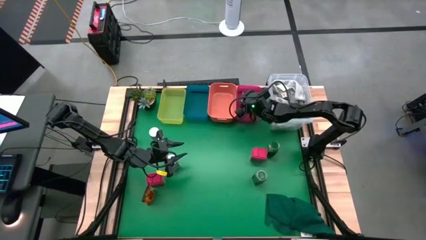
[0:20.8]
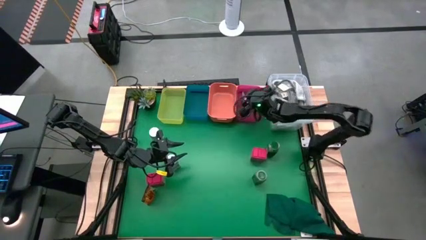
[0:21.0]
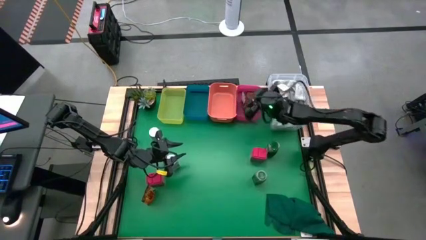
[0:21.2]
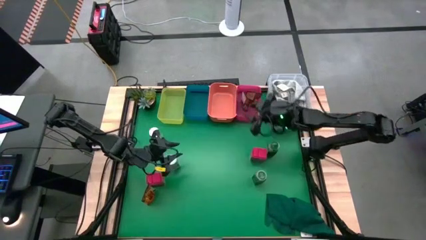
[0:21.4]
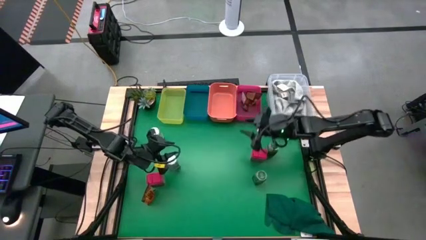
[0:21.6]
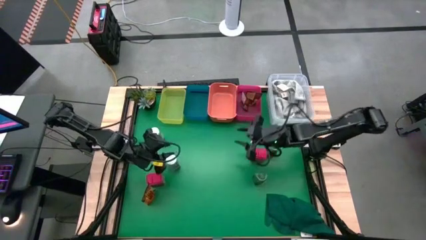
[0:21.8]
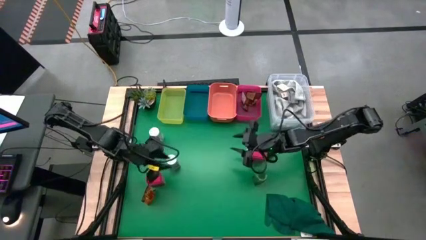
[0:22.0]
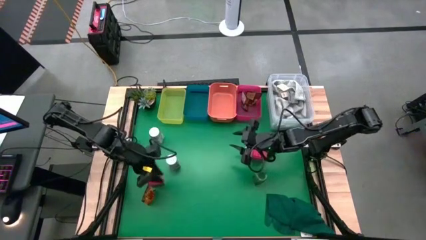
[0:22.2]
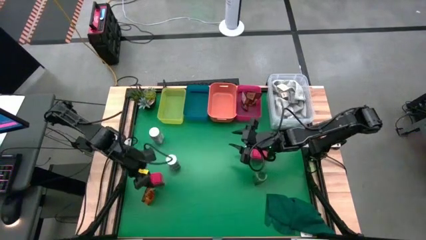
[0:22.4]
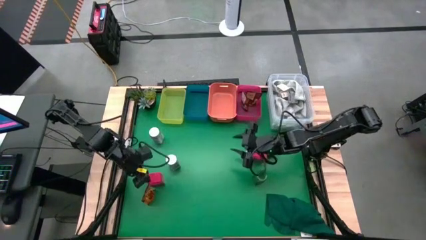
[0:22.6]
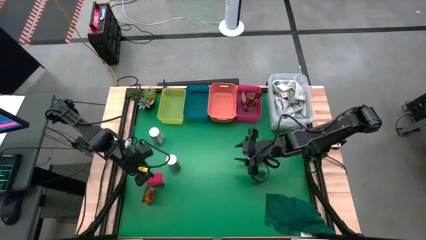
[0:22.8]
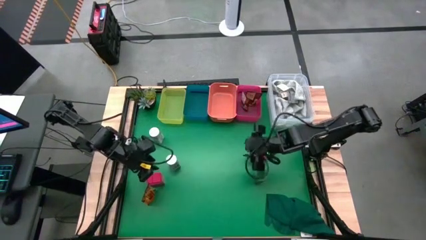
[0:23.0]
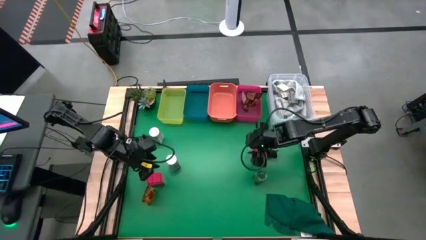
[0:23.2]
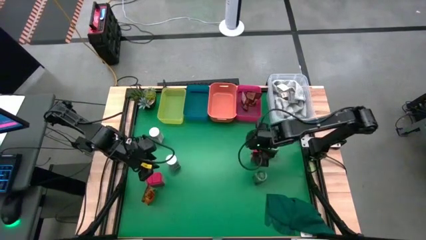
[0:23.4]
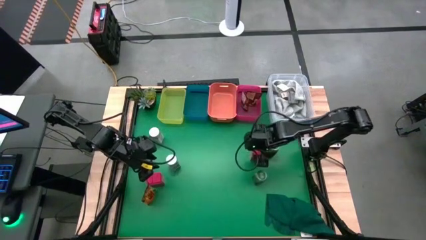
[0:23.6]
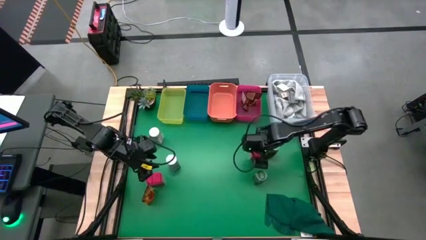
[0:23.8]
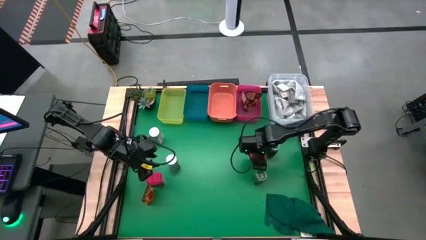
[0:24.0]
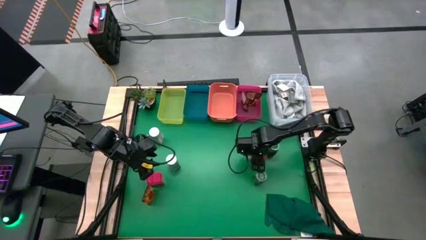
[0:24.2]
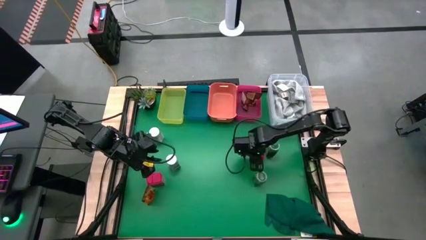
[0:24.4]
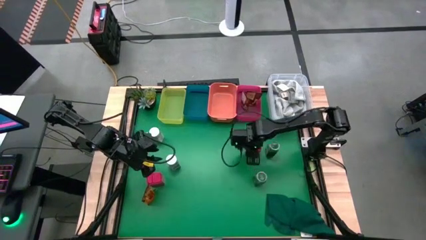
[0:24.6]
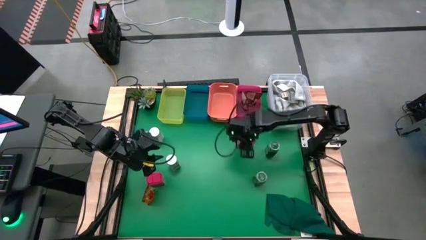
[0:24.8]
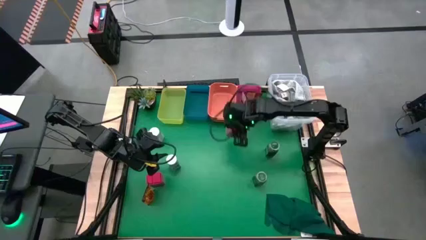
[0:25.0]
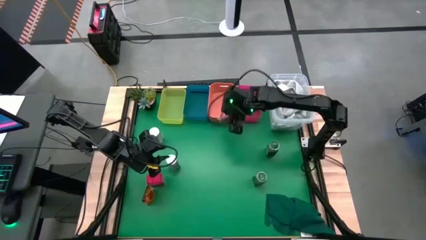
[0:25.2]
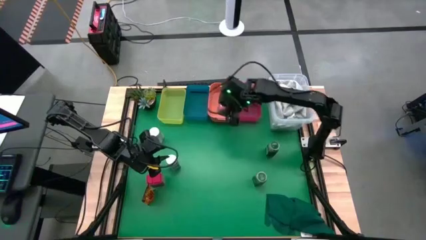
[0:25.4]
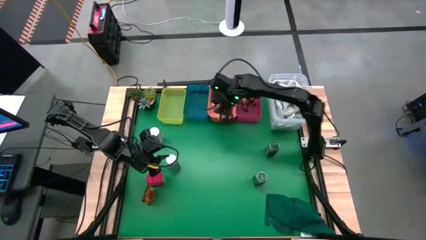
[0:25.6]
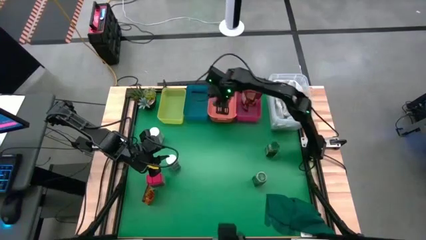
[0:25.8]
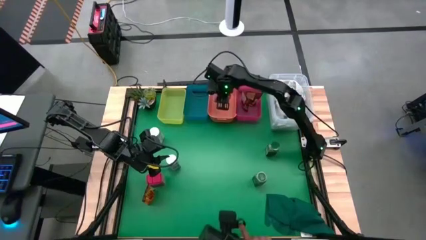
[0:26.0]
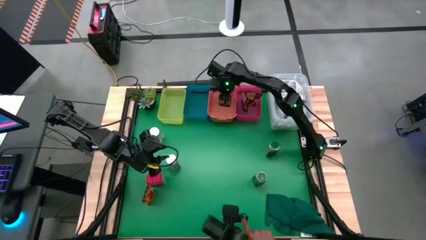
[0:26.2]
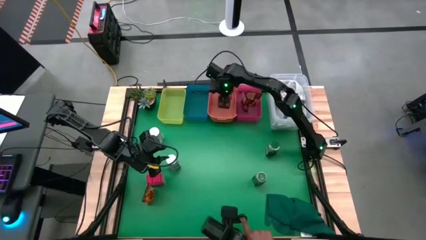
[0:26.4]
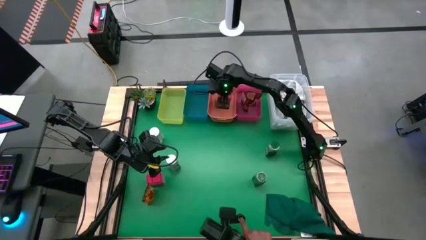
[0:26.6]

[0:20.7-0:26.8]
Task: Sort spices by type
Put the right red seasoning can into the orange bin

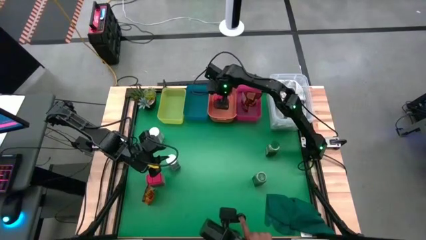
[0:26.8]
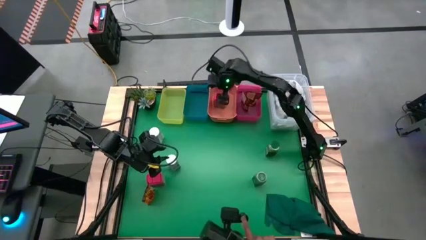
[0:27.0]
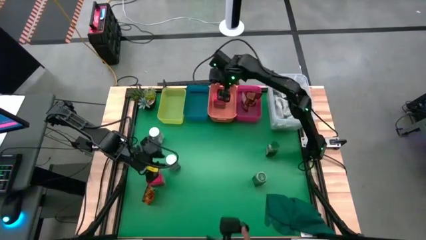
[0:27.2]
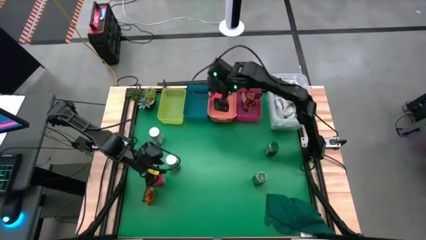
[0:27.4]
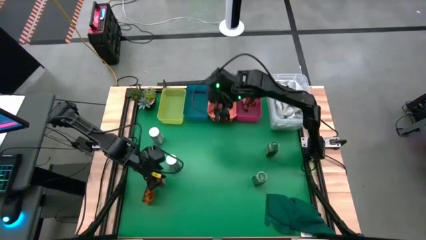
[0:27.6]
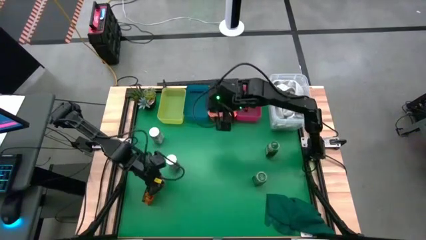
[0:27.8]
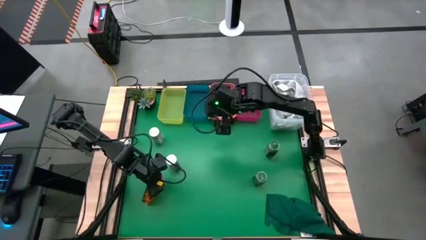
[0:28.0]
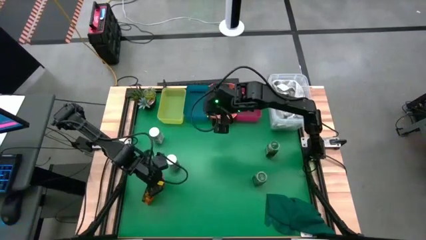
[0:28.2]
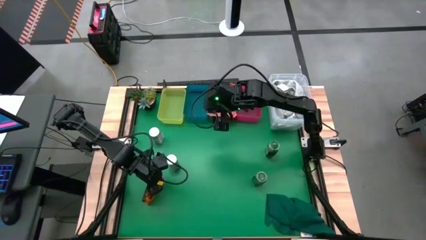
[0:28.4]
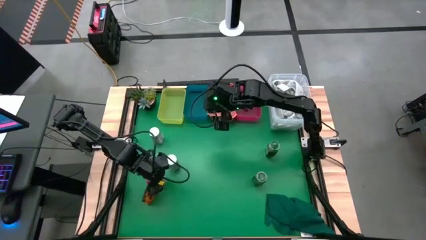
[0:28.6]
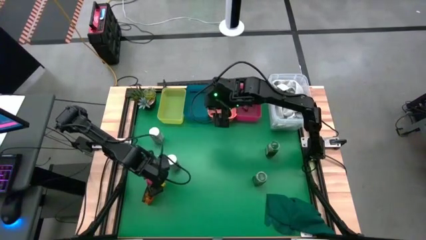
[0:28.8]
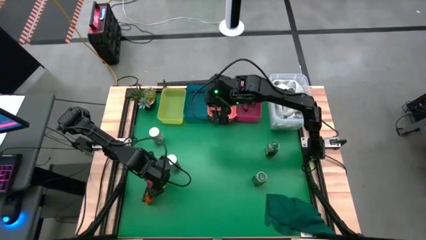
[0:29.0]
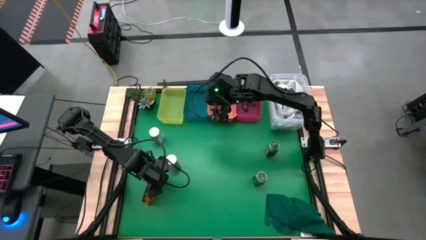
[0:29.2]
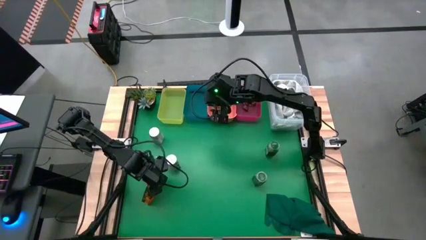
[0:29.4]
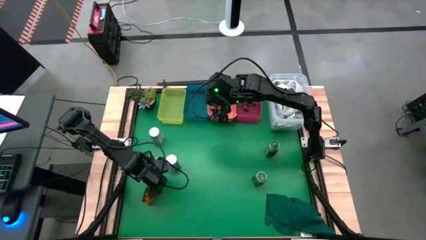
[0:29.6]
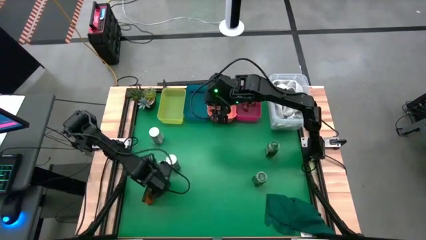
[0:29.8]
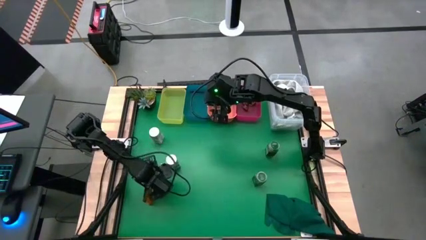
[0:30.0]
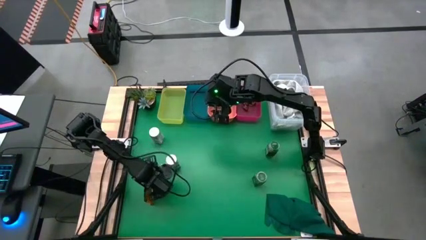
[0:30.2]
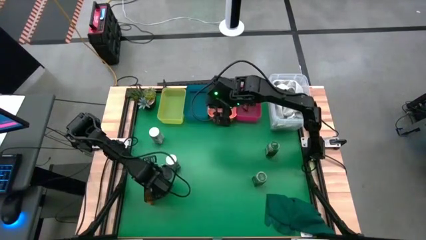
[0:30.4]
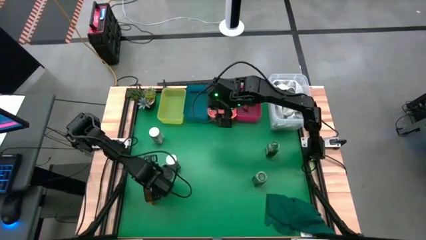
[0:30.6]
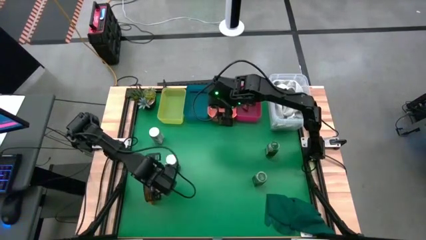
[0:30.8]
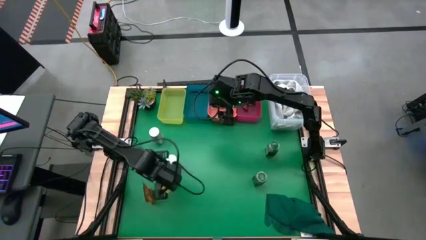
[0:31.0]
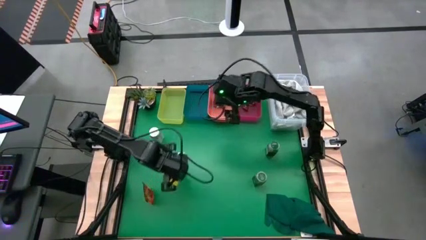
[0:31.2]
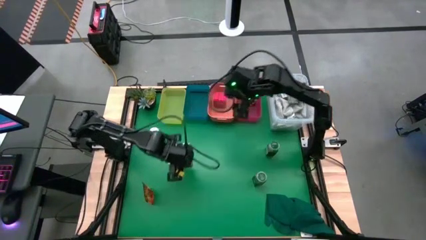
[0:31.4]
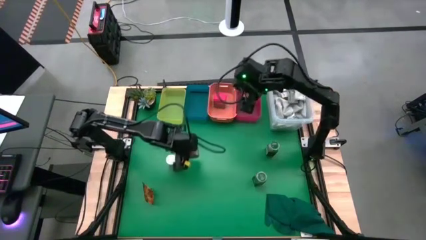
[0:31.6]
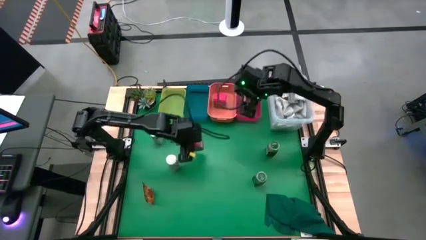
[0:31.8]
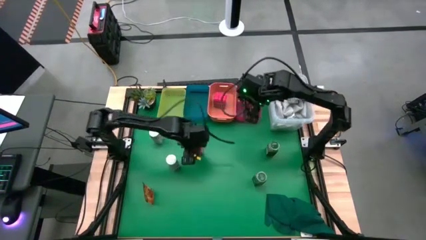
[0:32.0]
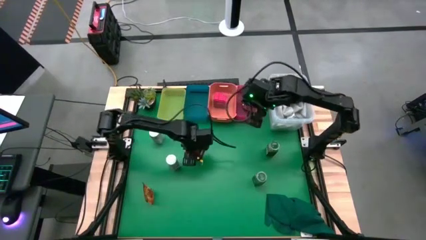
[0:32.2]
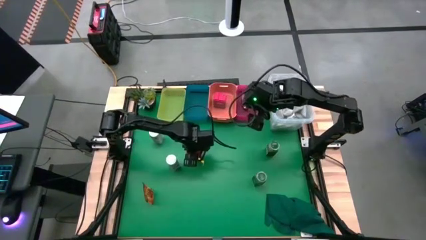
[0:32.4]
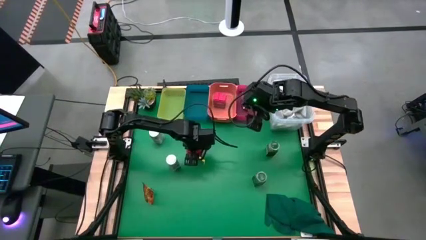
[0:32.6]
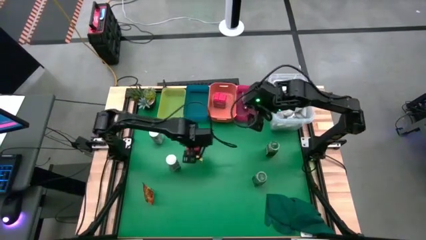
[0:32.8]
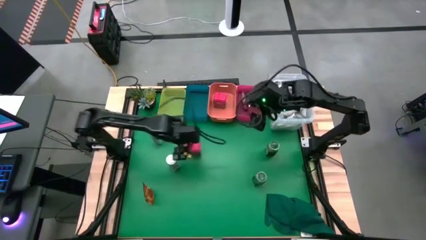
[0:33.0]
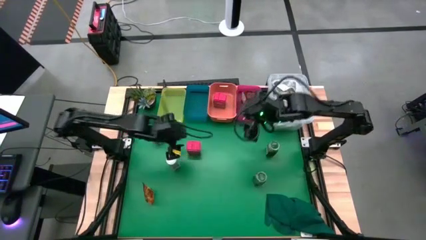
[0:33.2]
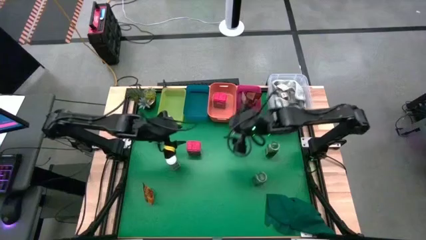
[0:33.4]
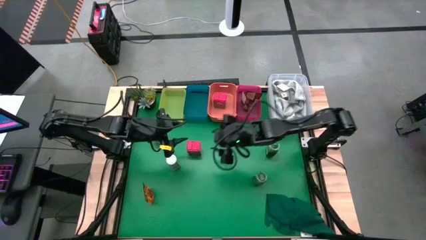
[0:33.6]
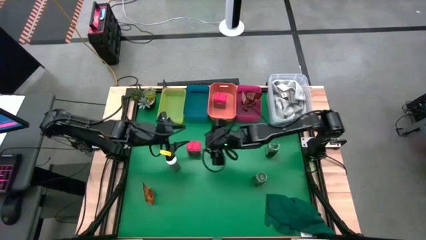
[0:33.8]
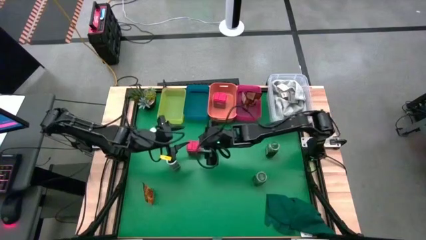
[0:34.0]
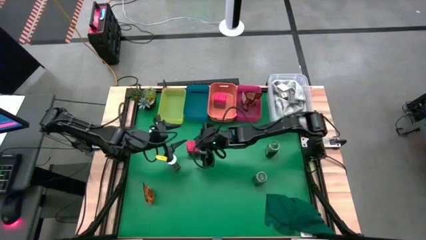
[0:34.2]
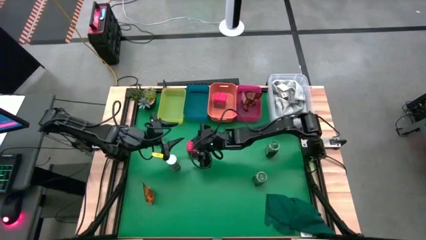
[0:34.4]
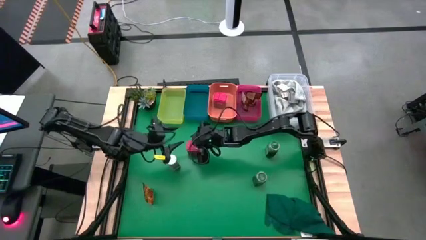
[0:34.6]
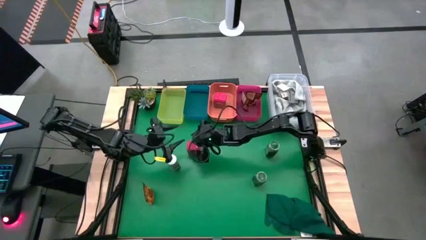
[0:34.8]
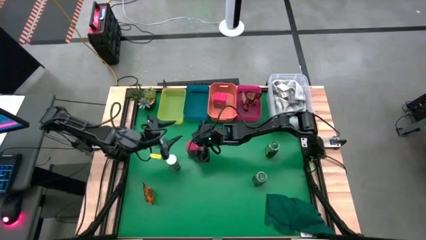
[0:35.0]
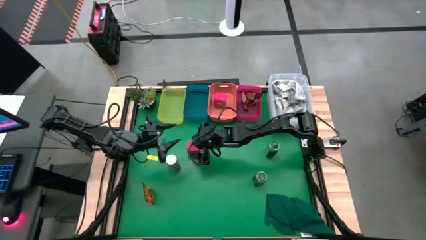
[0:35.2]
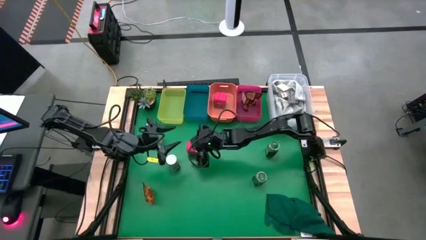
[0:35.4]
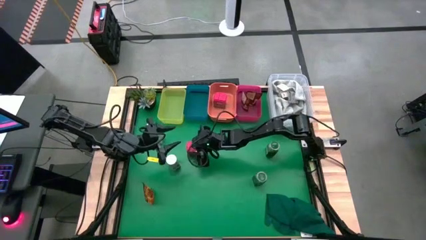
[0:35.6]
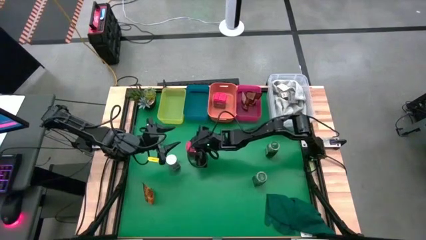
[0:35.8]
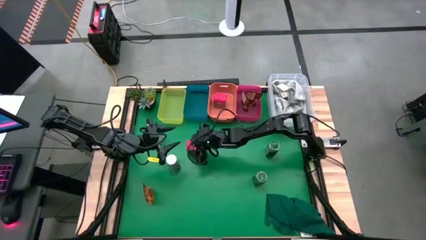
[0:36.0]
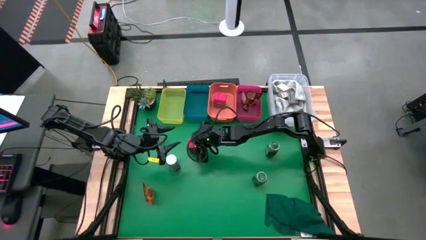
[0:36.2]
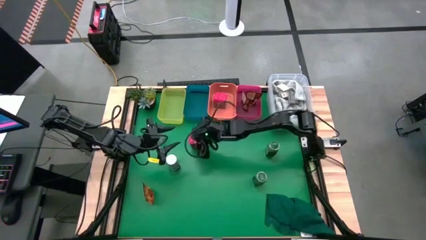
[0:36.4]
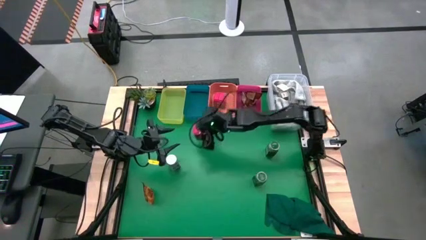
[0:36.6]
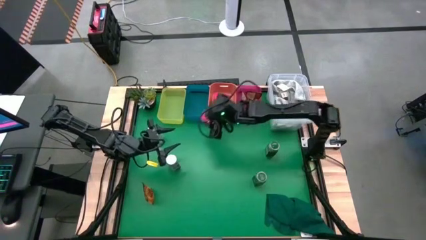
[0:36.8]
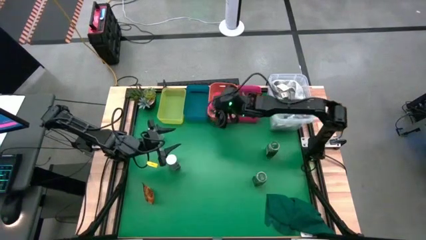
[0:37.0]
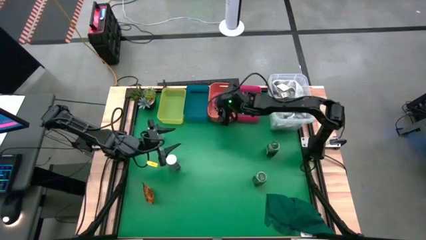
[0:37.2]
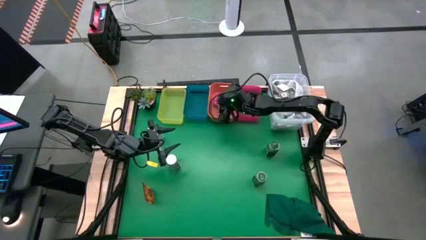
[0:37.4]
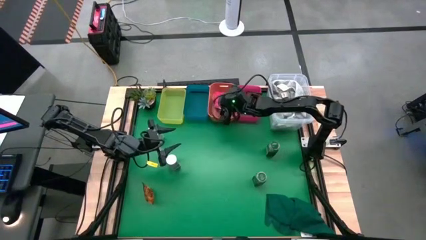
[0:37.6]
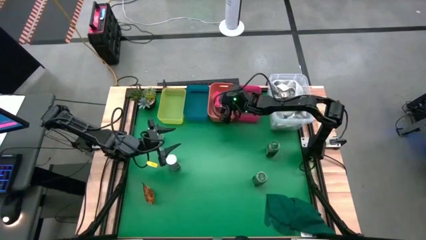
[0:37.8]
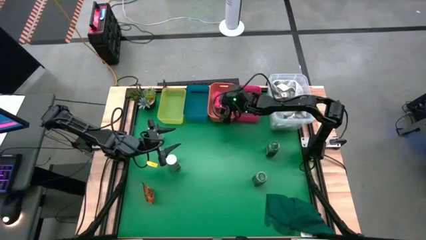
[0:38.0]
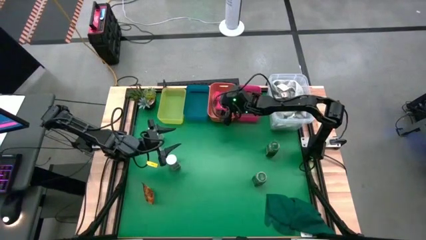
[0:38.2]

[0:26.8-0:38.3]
Put the red seasoning can into the orange bin
